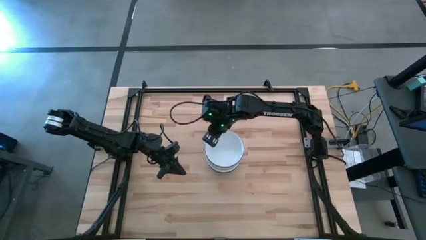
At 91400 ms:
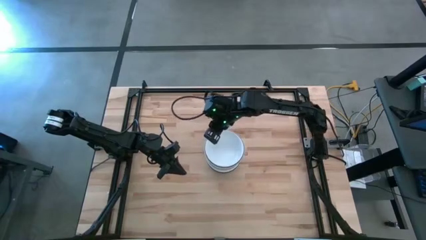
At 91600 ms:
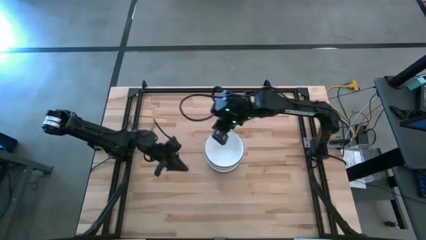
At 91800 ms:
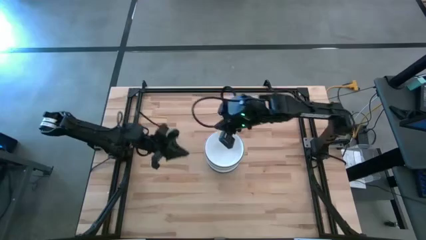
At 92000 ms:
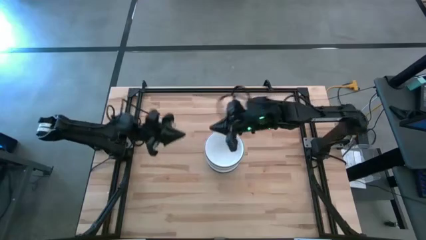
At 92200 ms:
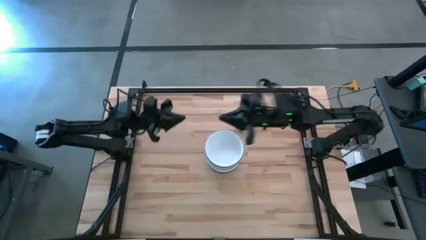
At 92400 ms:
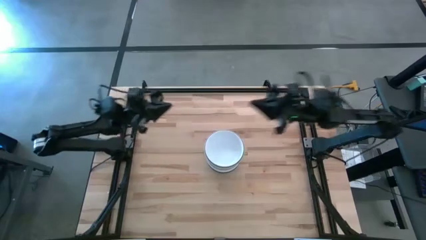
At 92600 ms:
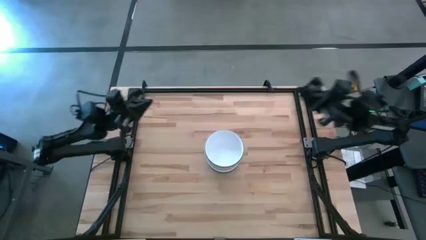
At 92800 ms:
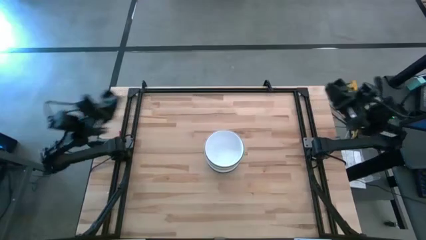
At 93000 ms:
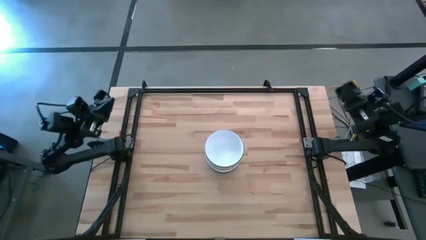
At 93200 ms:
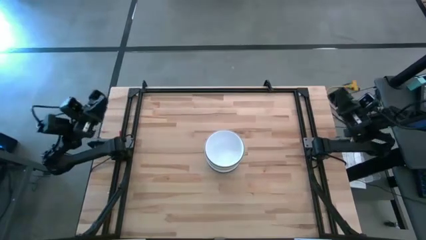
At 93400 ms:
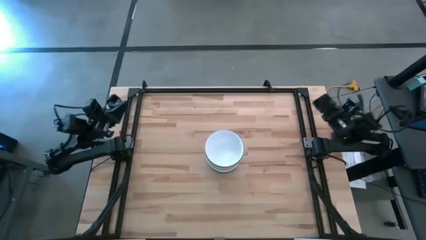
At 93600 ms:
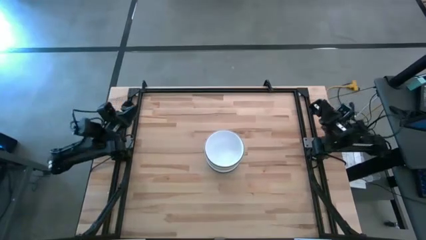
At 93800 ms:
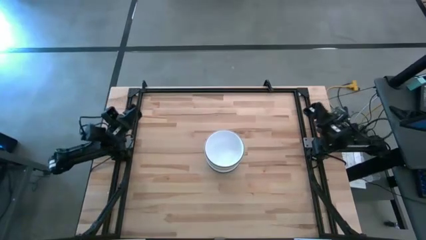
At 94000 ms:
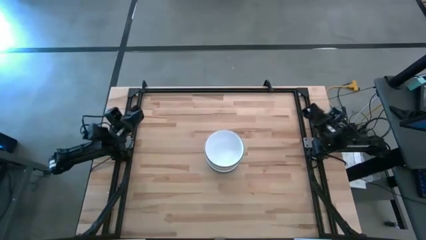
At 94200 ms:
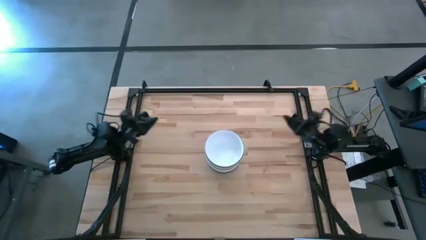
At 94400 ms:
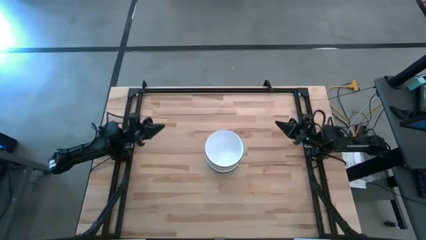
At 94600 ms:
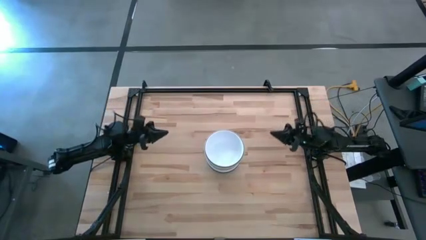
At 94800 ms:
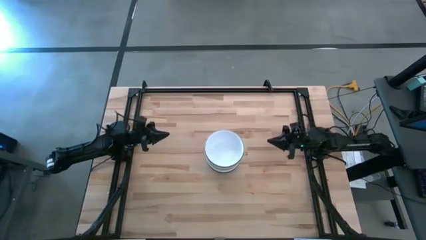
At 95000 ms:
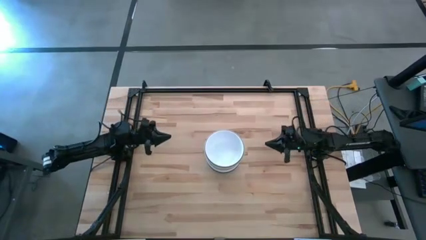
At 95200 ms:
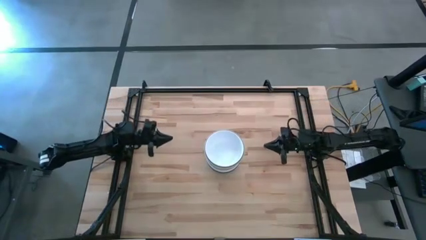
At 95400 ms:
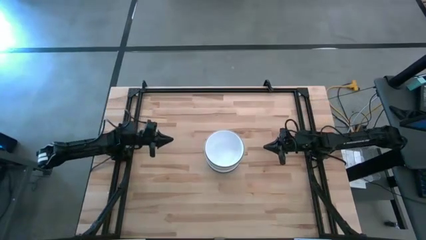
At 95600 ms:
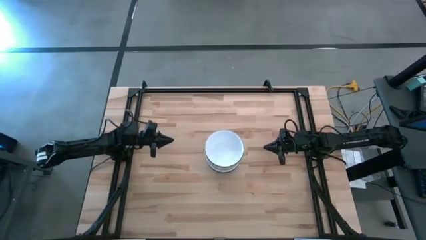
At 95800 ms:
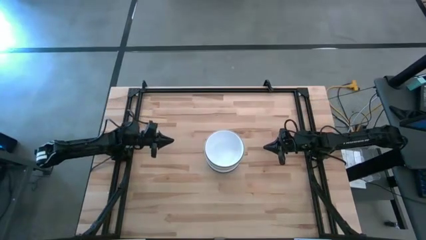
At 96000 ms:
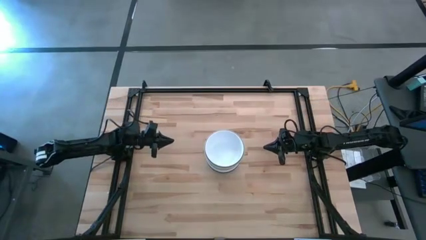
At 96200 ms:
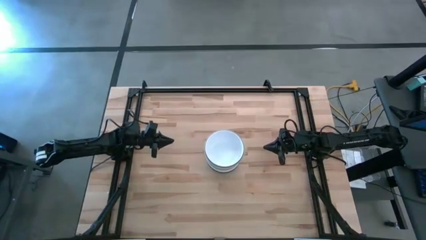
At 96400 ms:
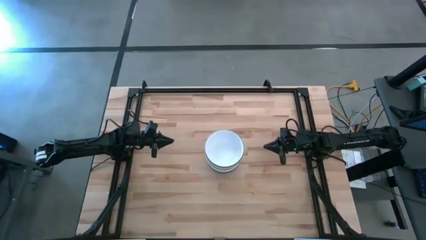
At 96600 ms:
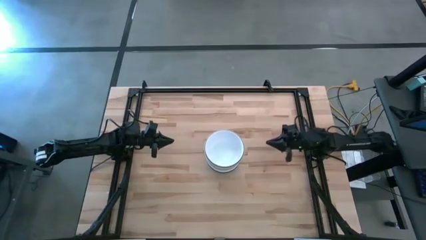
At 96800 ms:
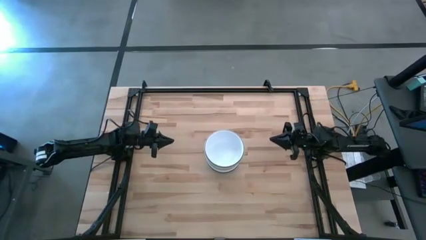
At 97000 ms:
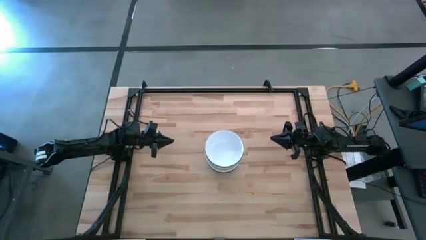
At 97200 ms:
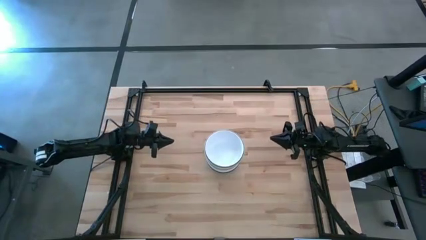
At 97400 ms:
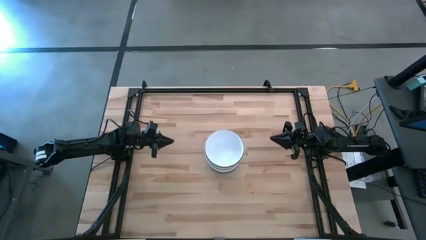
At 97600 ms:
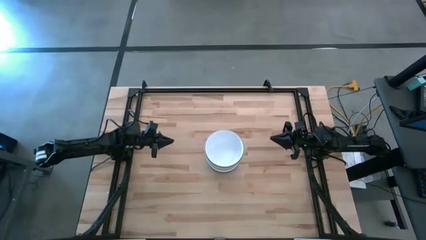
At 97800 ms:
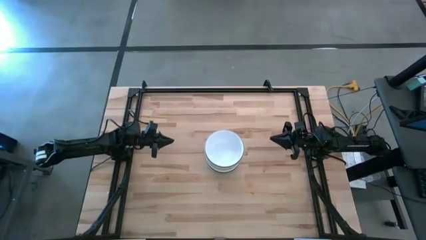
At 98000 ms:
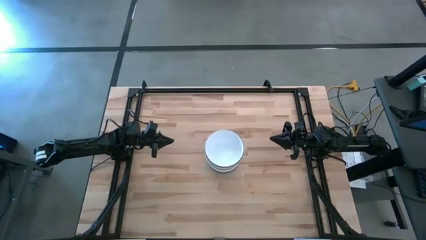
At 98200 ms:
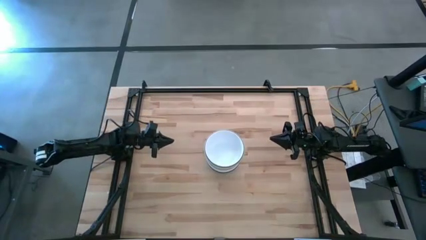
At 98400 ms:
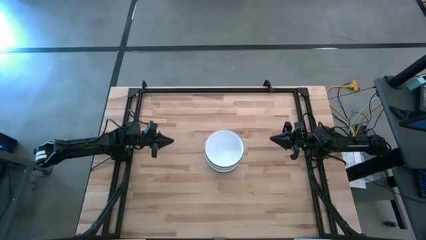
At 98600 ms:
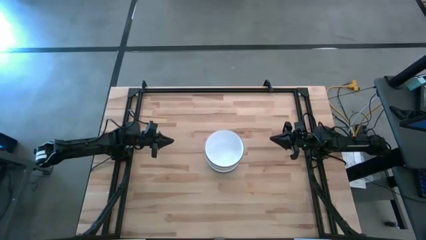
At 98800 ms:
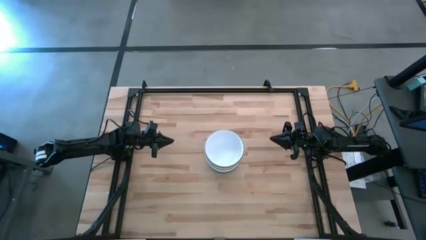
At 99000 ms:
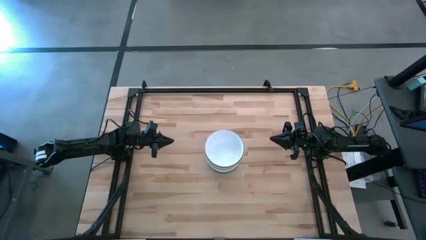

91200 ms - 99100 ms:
Task: Nest bowls inside each other
Return to Home Position

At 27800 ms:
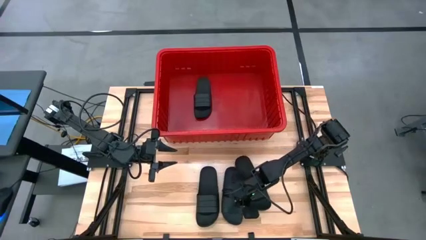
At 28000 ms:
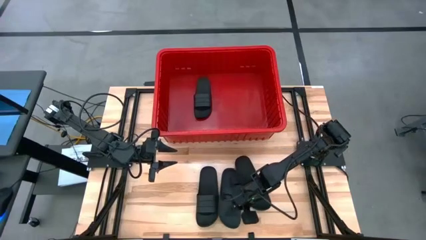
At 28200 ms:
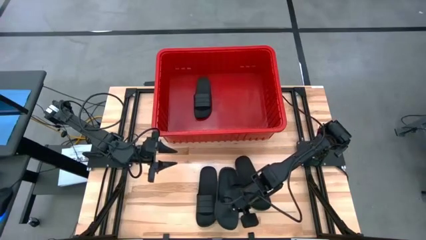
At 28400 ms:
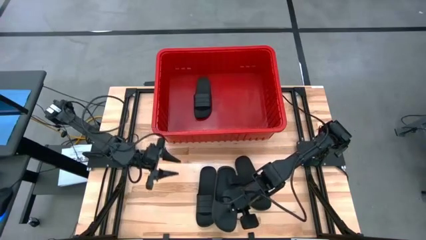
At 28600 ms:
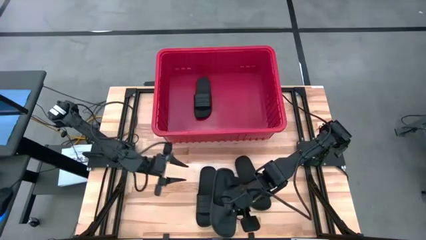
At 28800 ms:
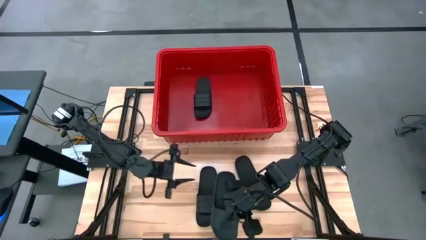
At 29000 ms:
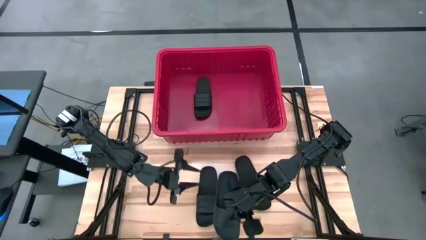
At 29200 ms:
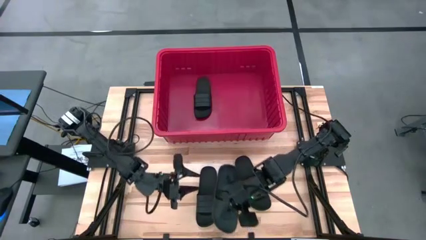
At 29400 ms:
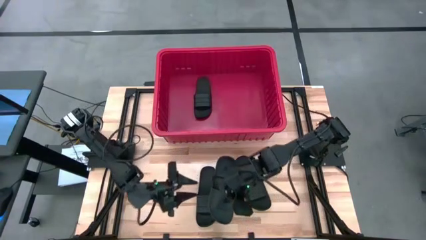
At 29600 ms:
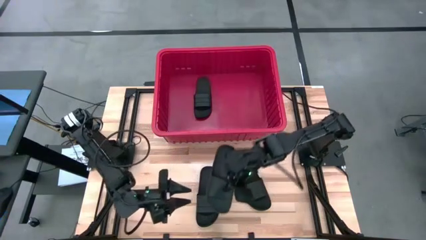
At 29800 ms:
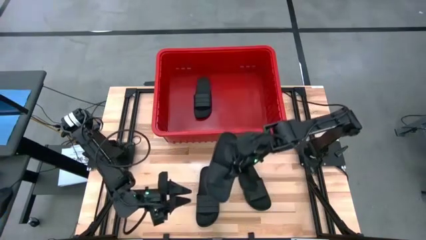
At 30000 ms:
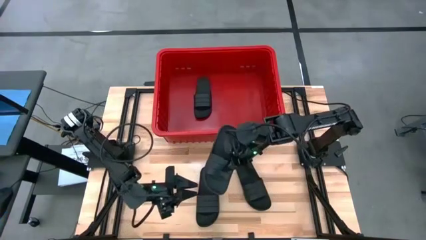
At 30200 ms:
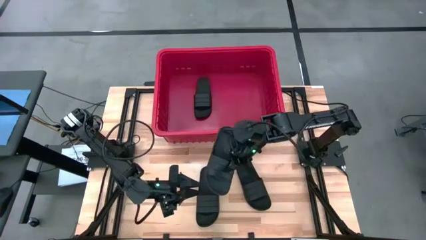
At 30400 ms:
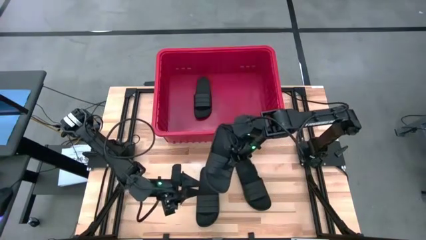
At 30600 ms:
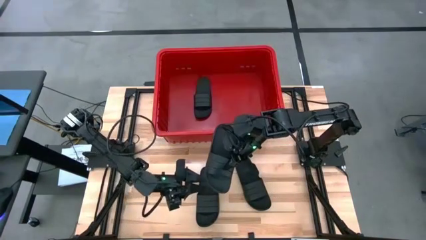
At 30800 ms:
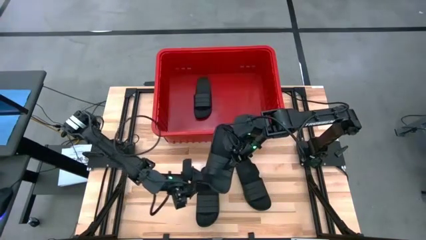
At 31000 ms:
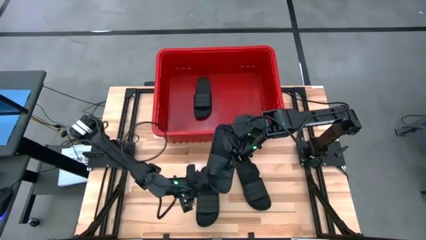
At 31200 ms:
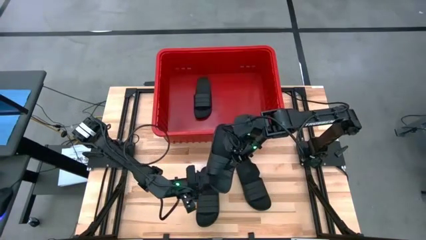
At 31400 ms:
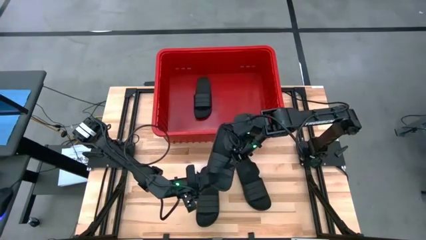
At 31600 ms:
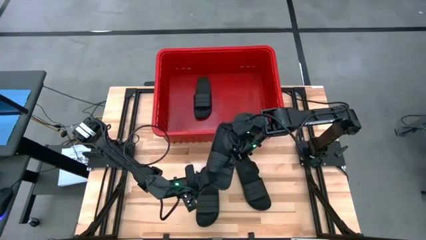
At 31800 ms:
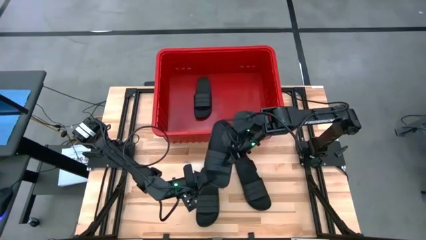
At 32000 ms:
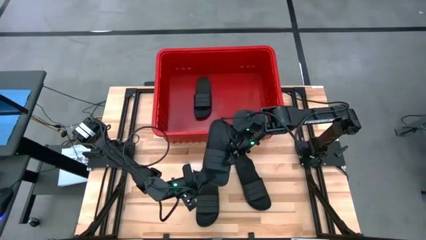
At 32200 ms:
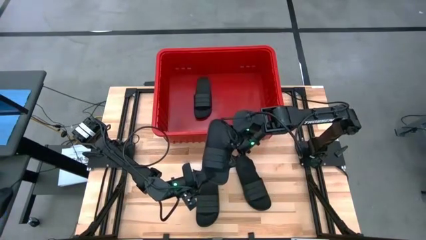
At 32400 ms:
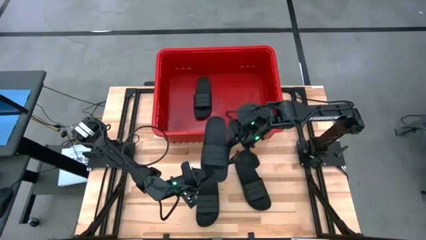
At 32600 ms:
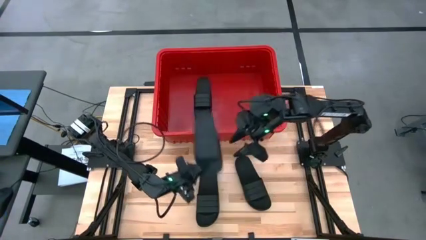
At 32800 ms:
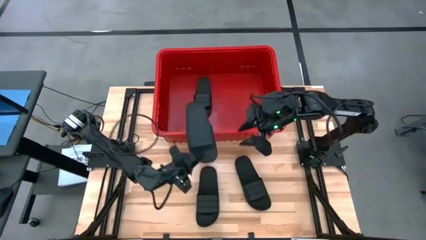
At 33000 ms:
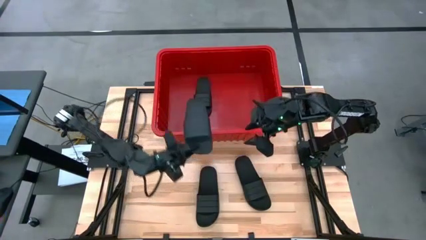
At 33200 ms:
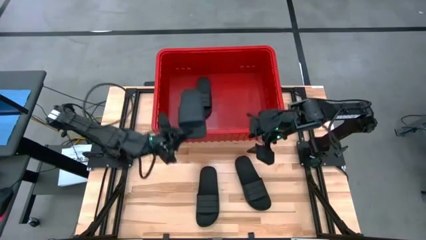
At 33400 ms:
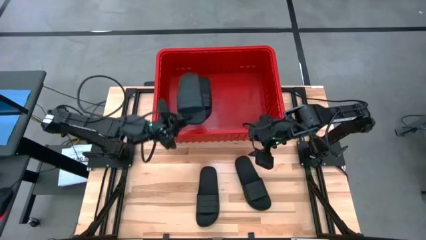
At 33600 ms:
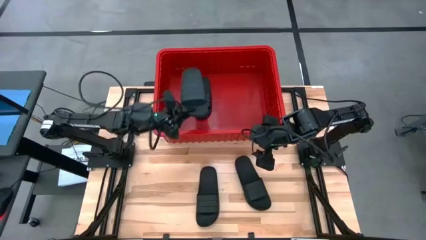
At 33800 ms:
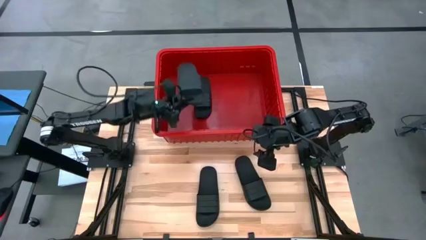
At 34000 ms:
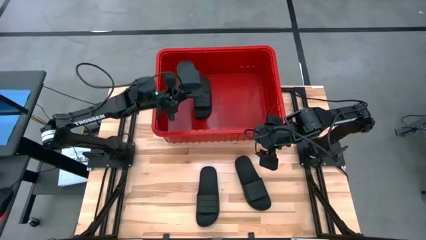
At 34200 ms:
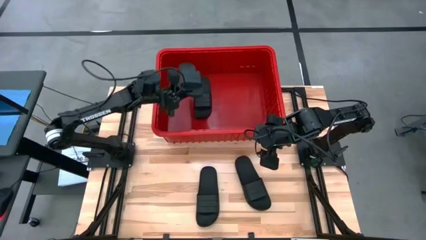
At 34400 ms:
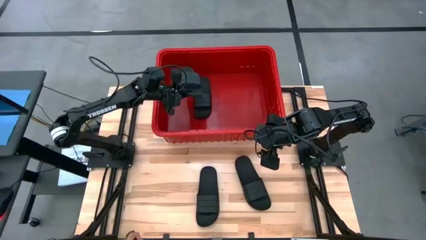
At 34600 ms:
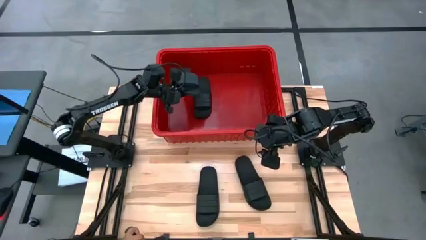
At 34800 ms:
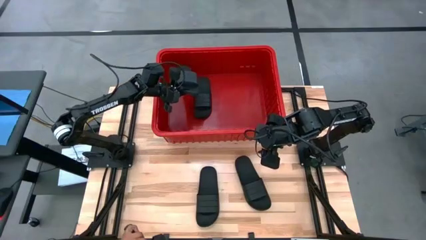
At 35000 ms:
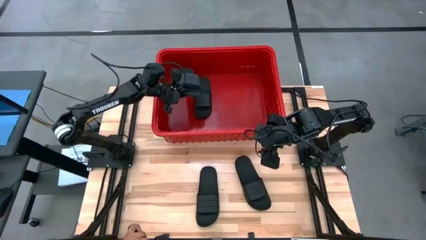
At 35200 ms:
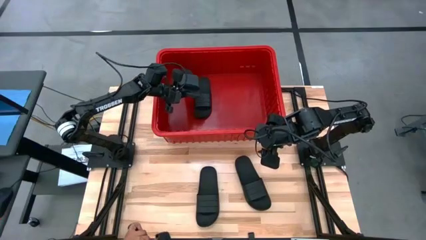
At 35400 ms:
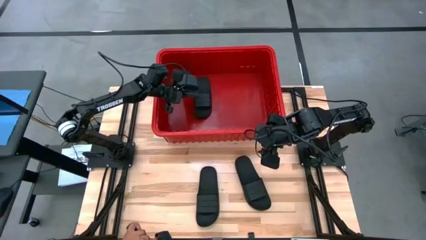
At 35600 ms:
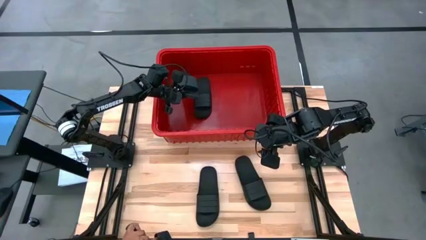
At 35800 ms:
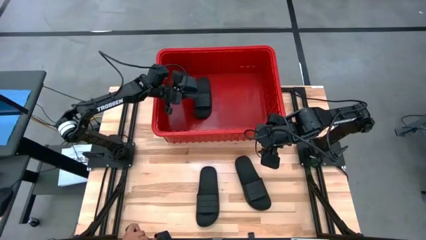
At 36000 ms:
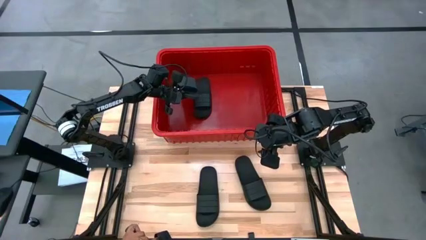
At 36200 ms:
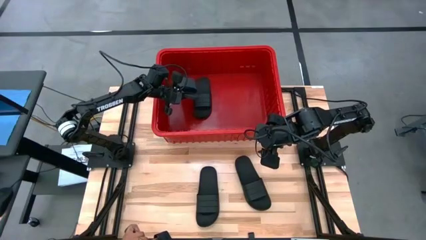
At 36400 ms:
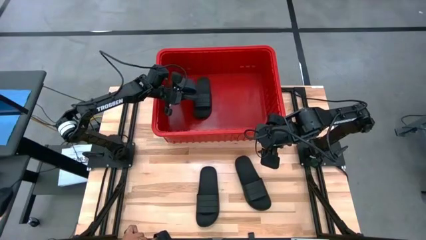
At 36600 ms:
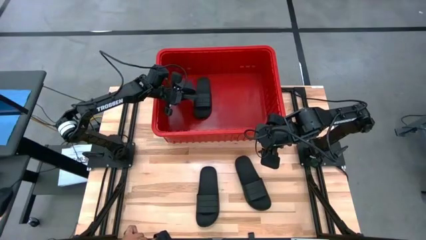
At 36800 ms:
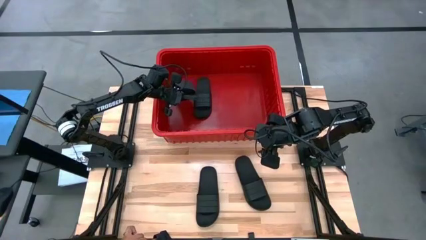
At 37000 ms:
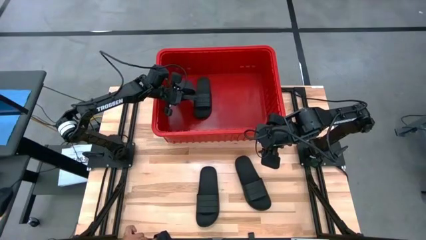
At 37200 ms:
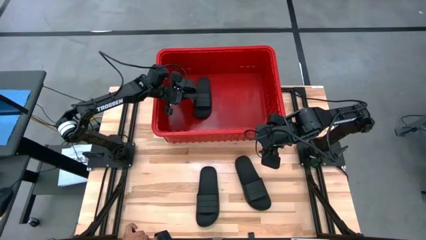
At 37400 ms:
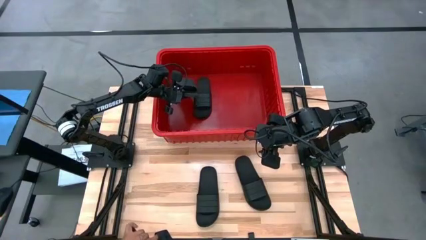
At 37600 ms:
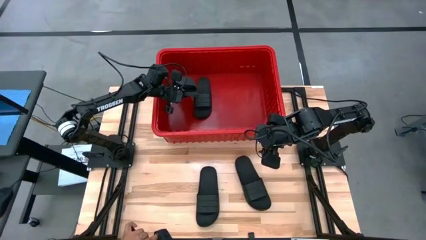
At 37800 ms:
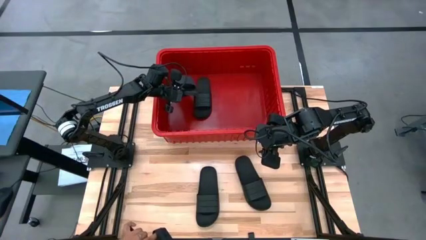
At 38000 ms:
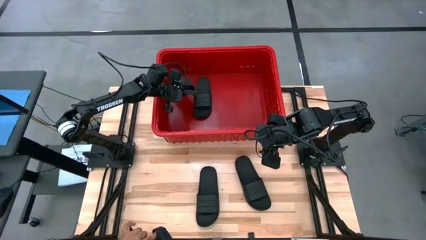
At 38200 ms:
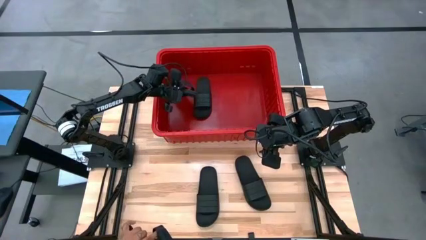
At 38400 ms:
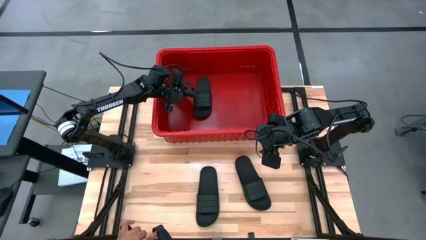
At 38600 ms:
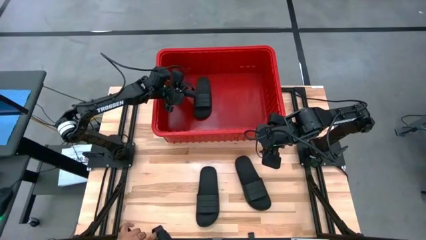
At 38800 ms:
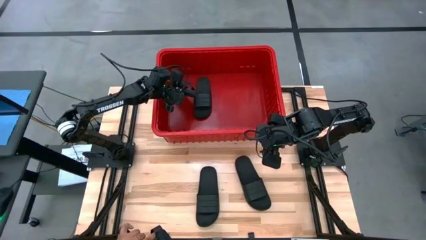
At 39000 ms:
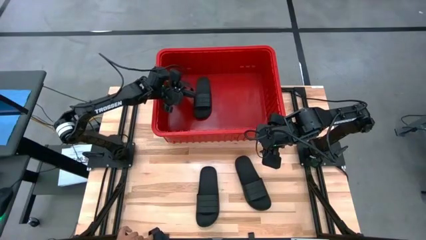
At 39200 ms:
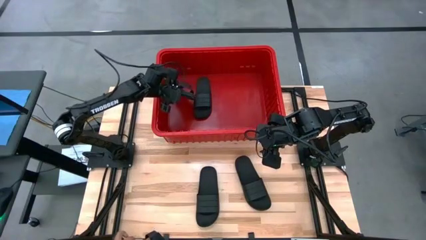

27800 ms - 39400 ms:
Task: Pick and place slides into bin
Put the black slide into the red container
